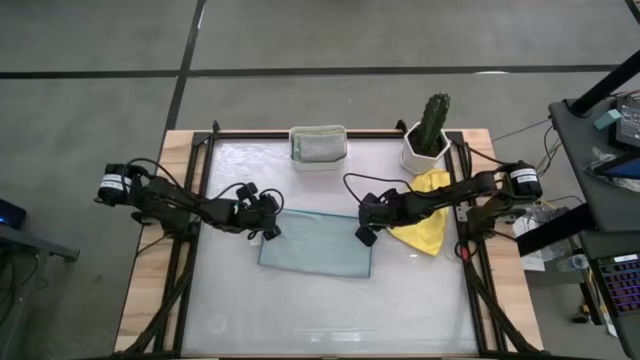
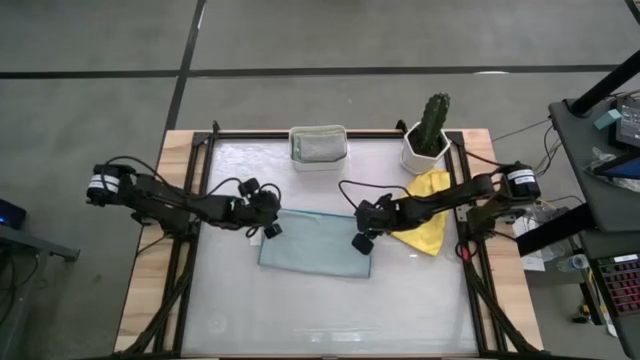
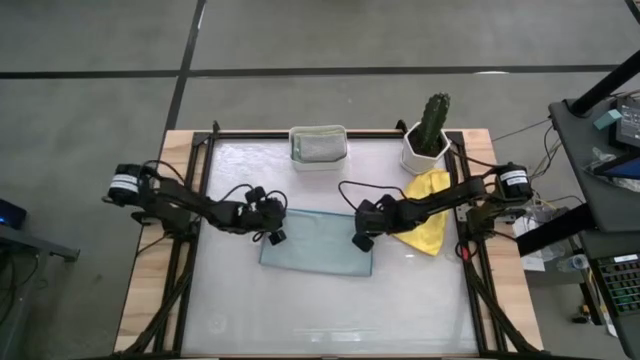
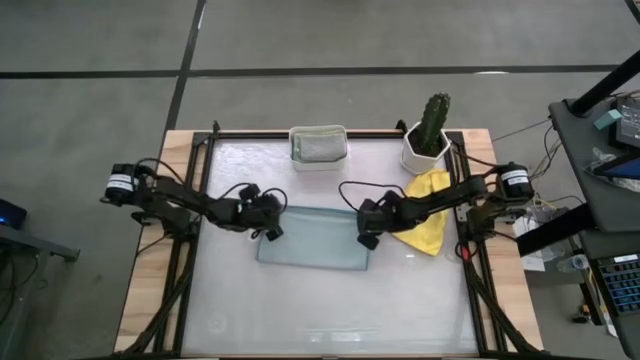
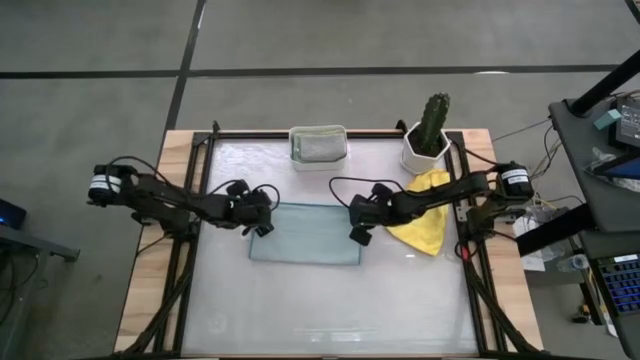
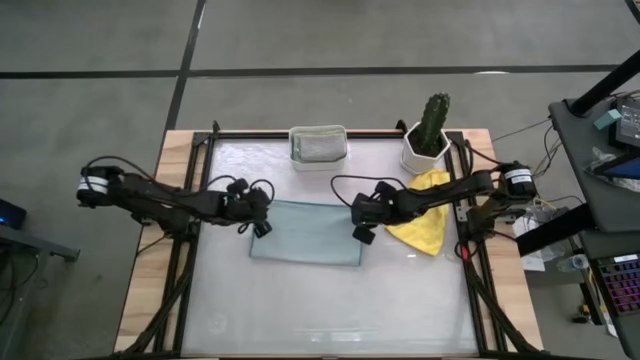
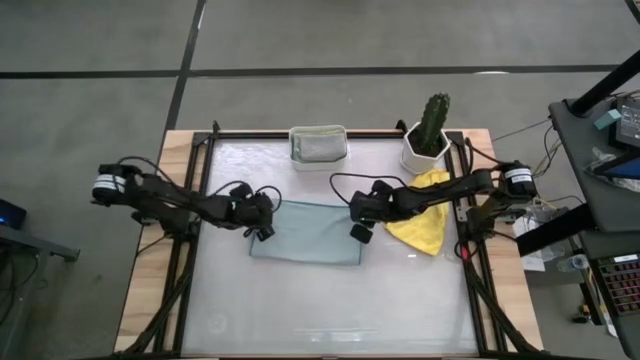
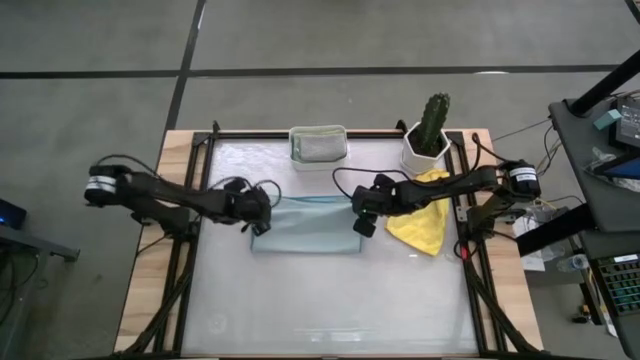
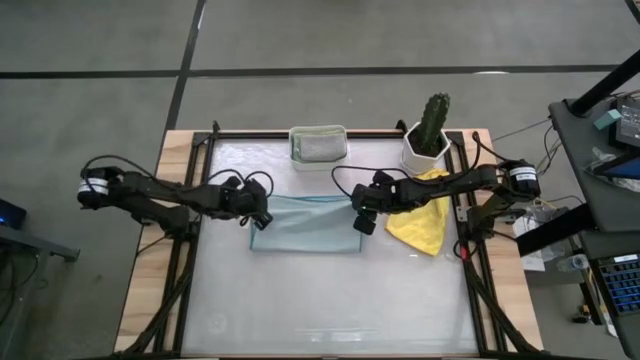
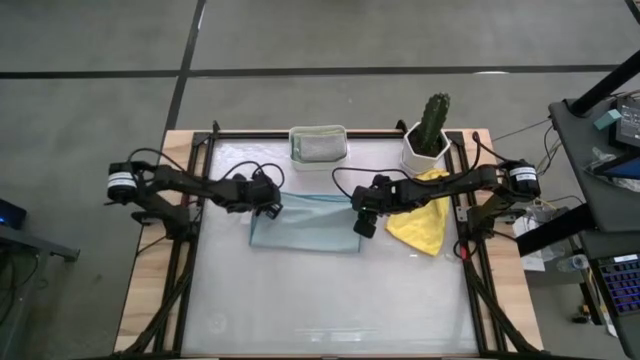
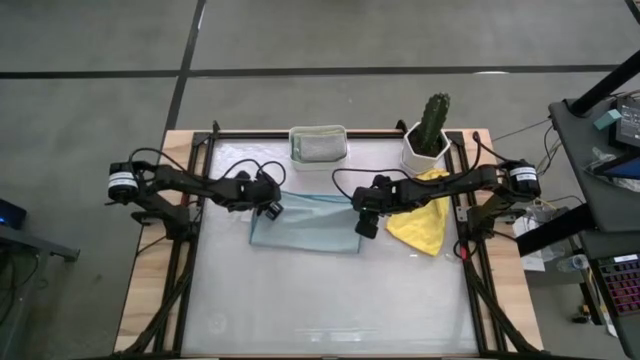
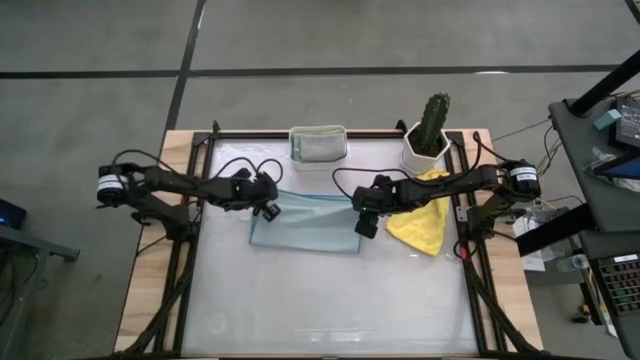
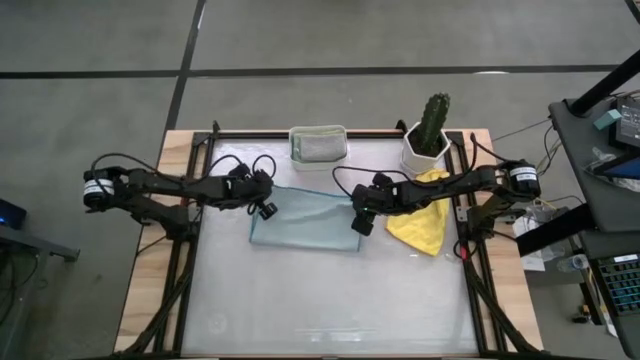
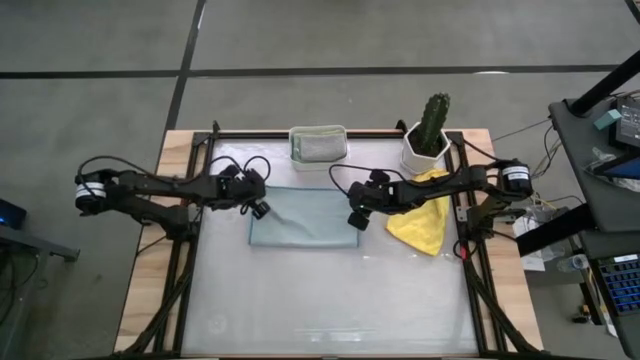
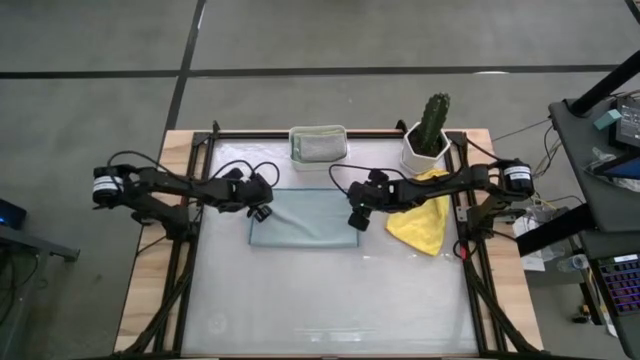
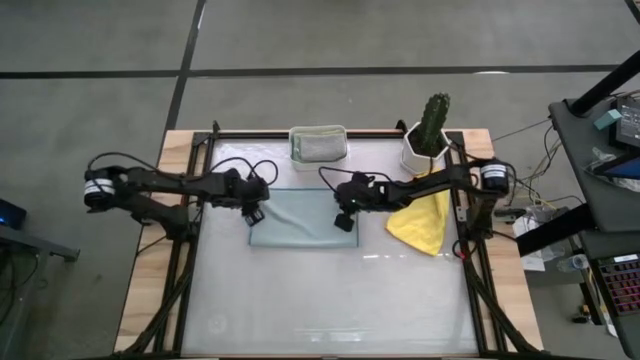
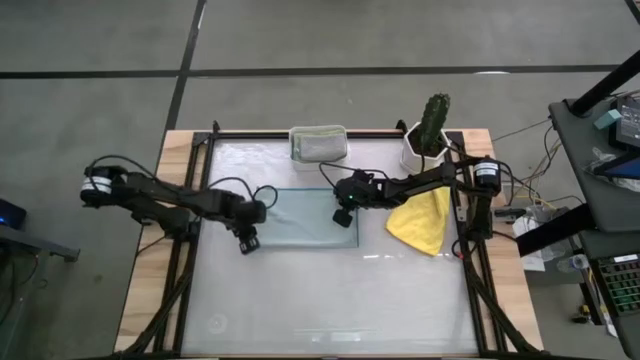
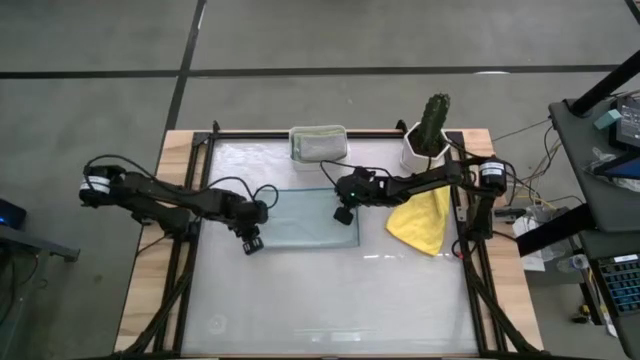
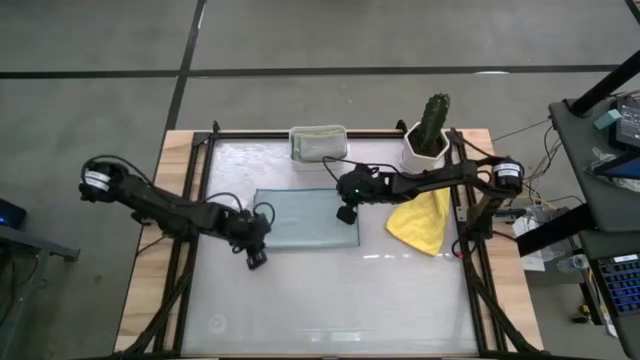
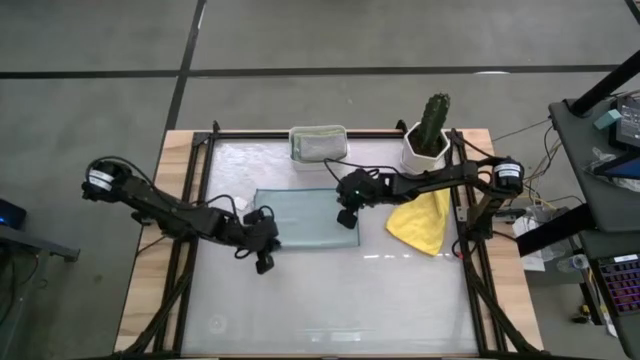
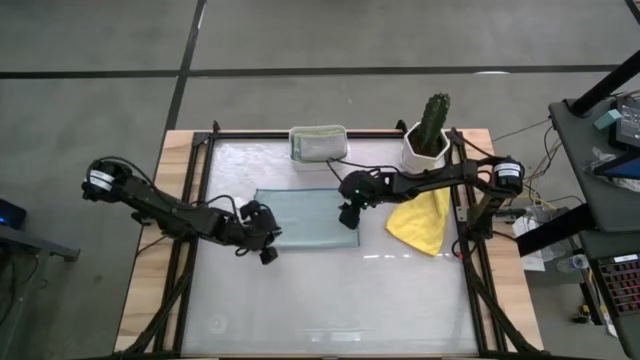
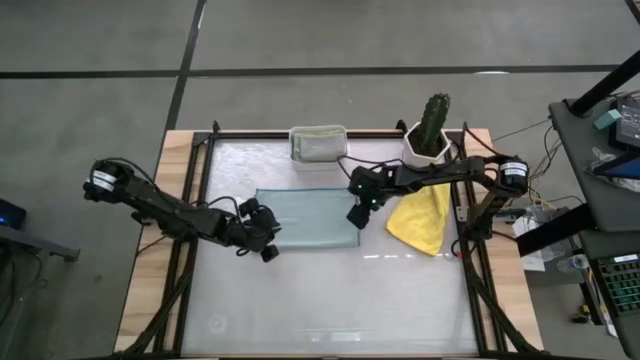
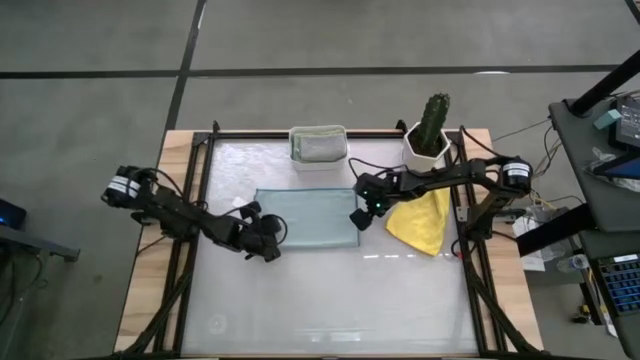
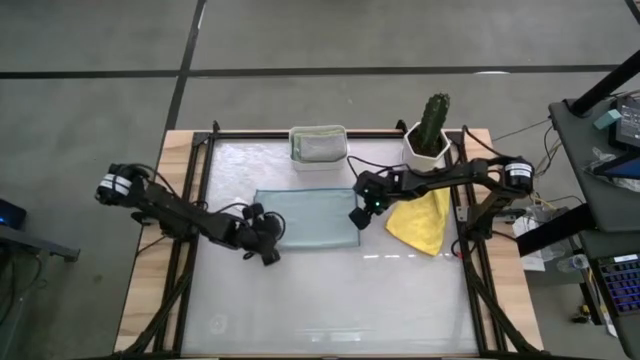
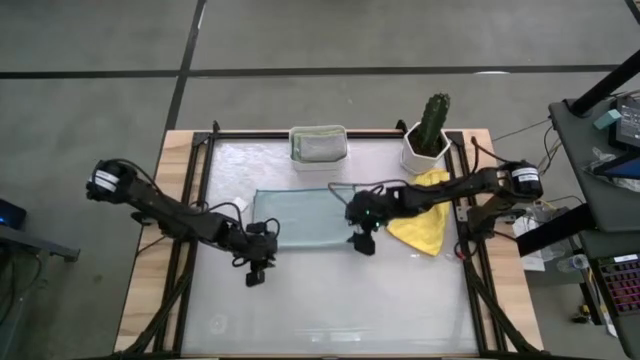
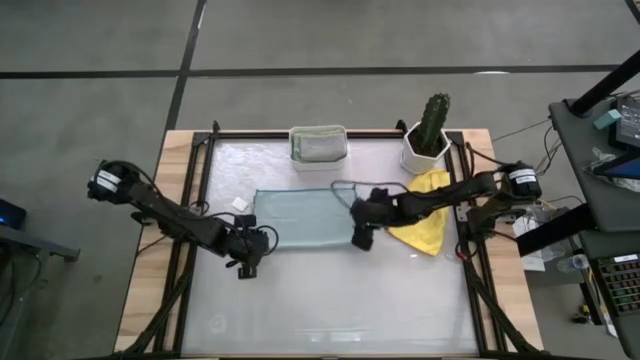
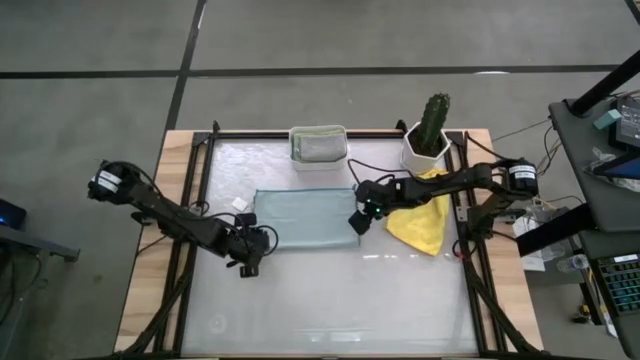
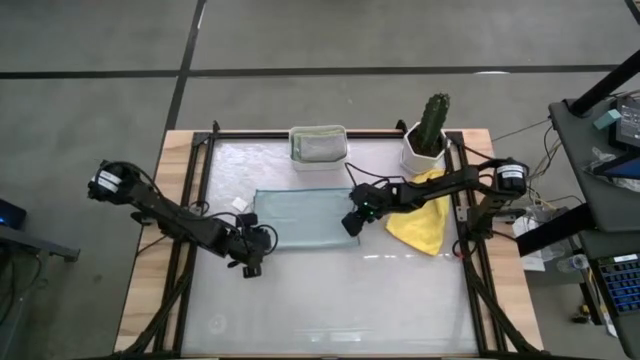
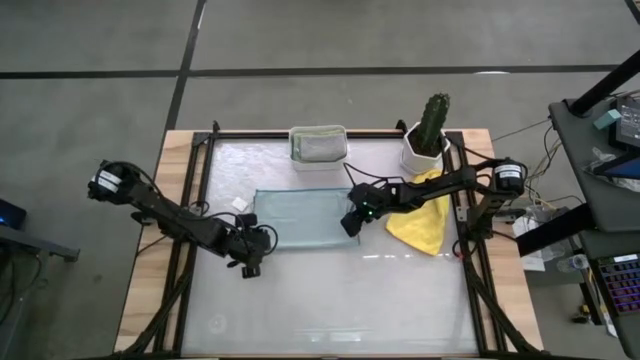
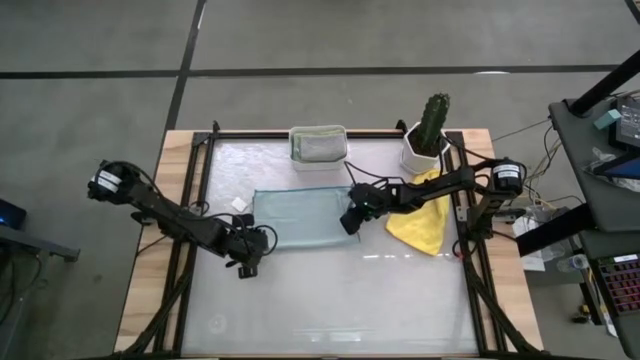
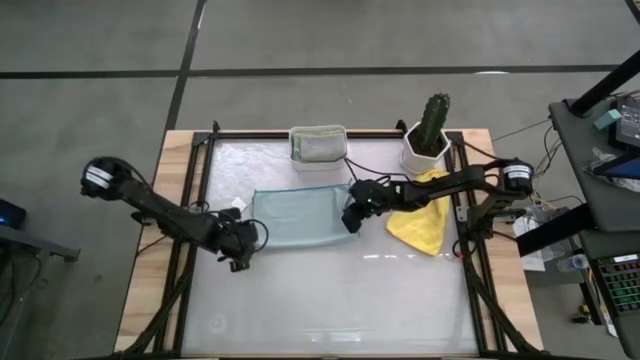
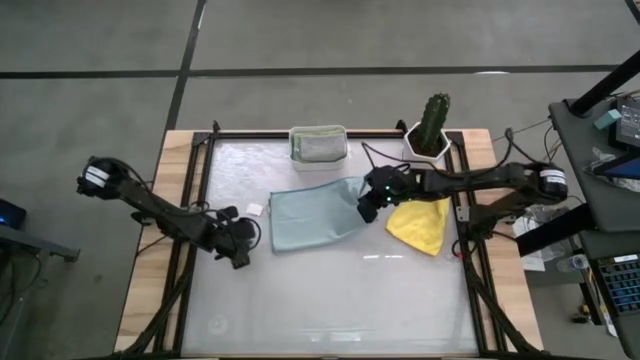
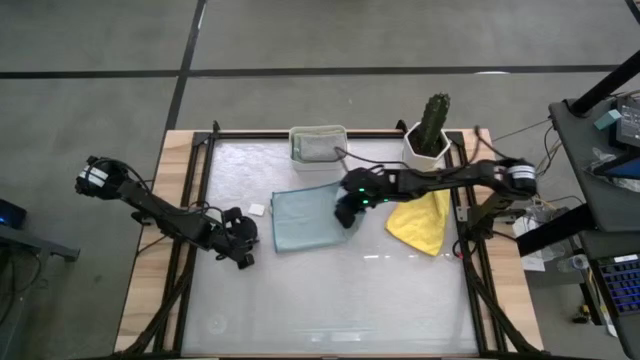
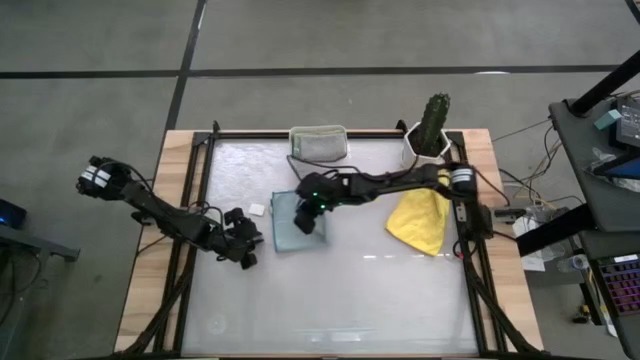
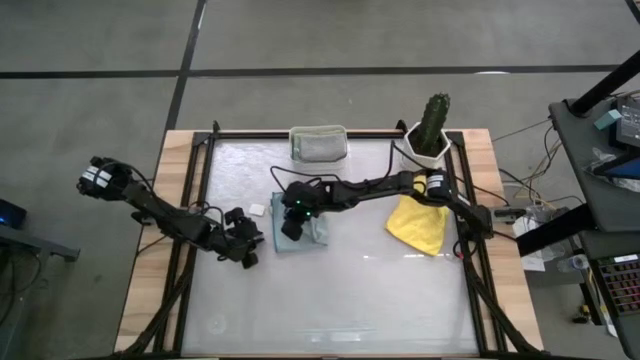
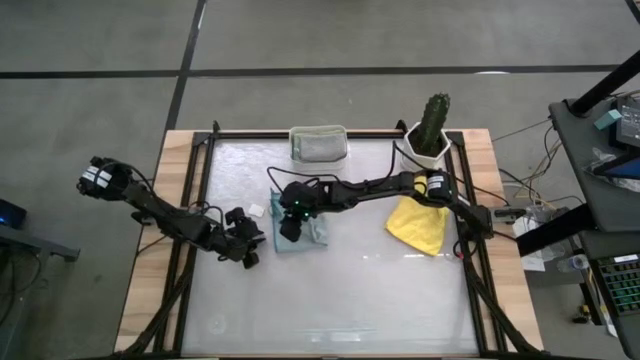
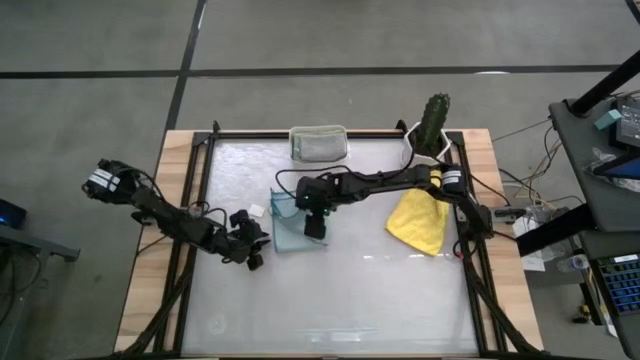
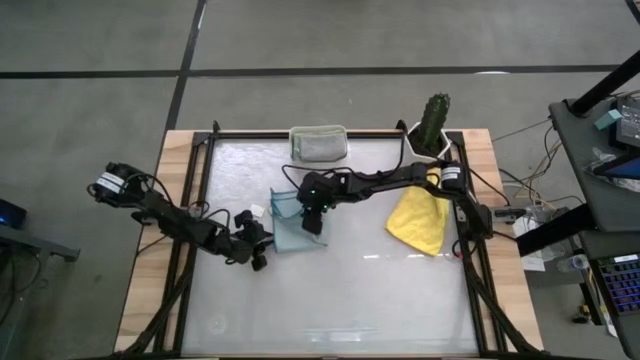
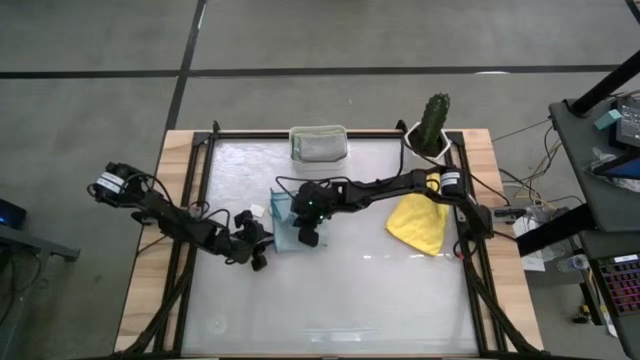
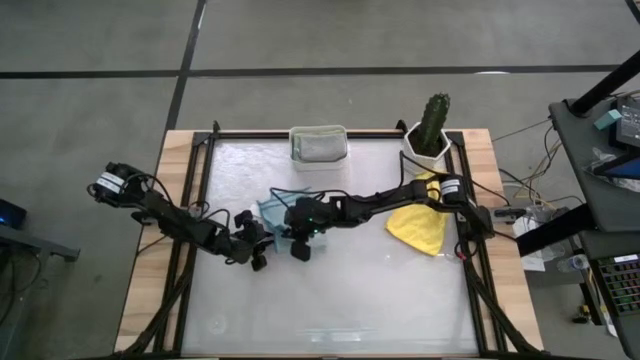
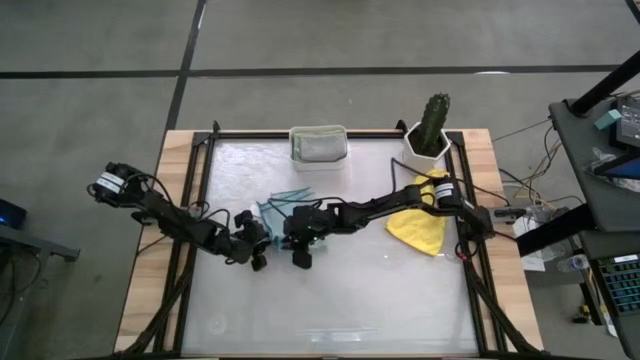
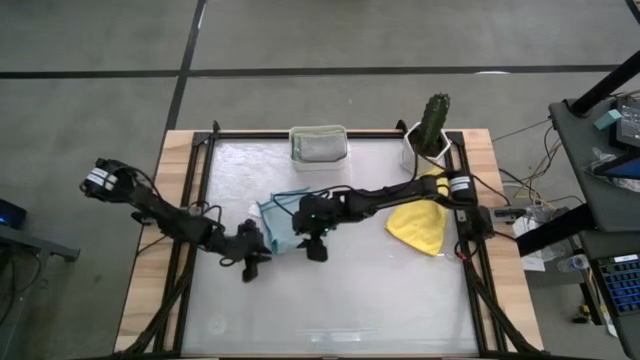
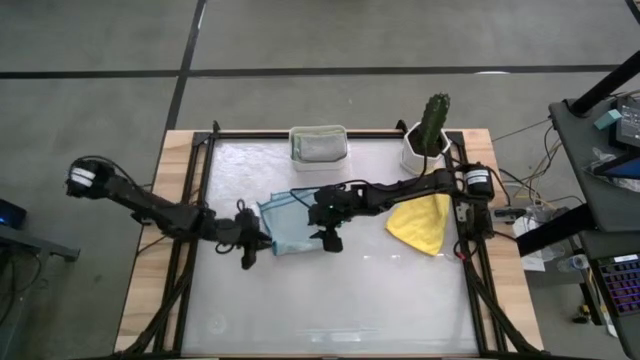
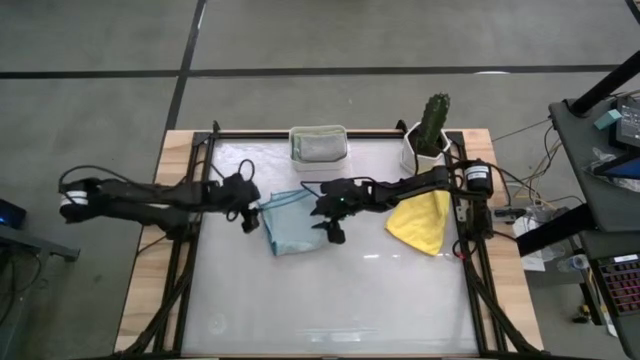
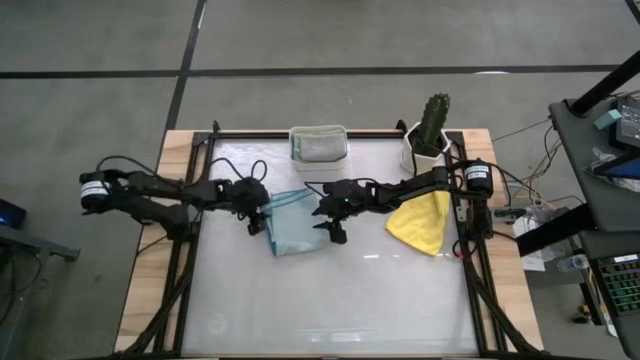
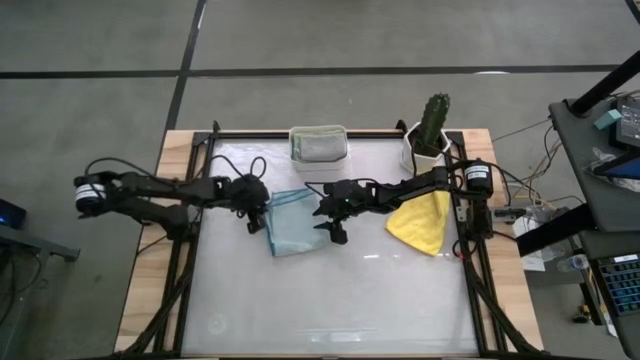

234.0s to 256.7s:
Task: Fold microfiber towels
Fold the light blue cloth
